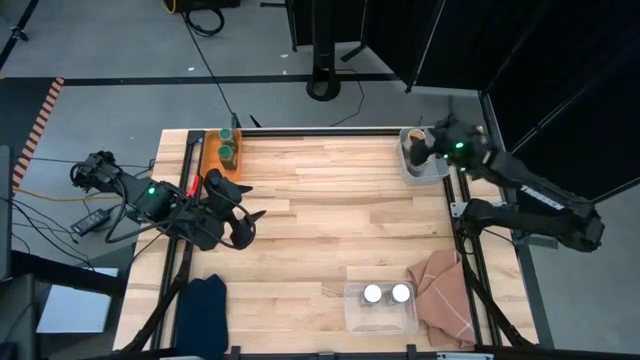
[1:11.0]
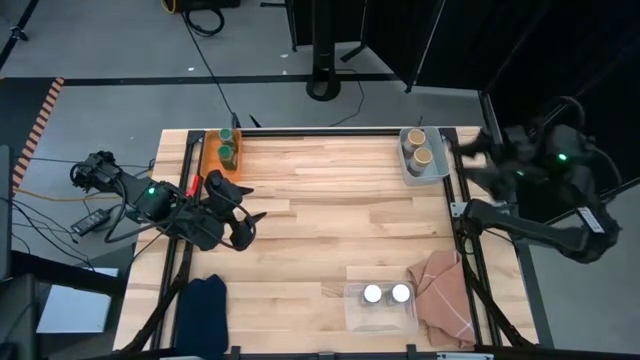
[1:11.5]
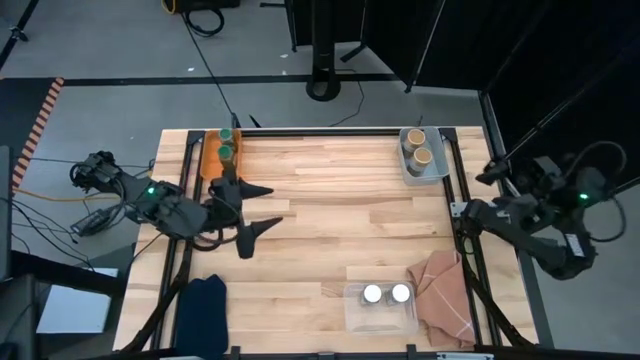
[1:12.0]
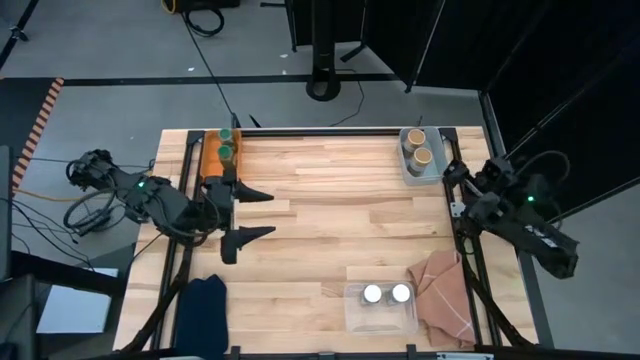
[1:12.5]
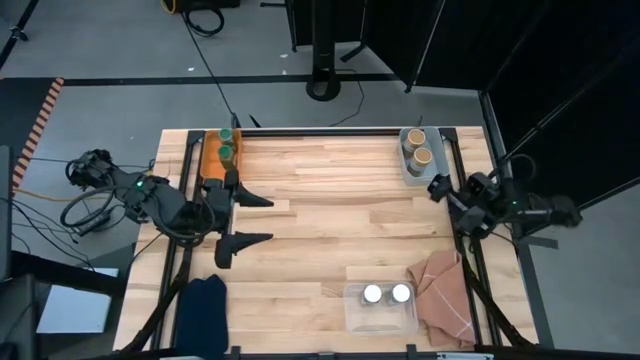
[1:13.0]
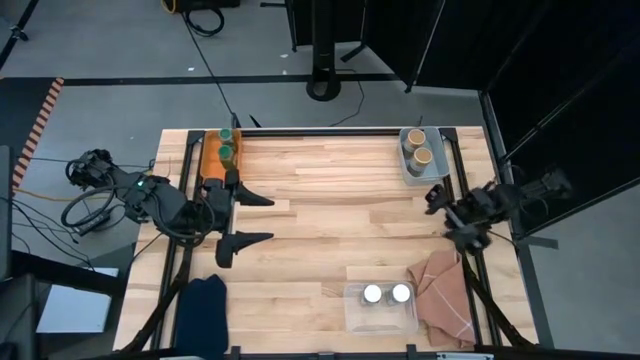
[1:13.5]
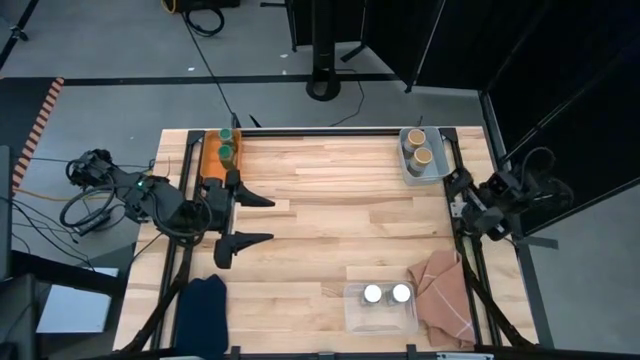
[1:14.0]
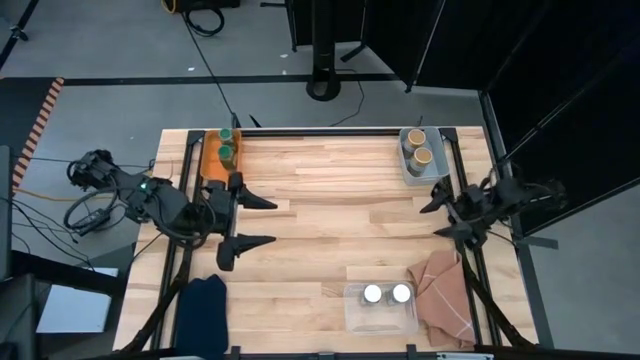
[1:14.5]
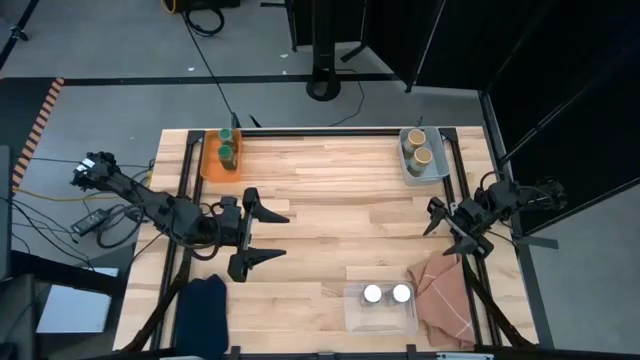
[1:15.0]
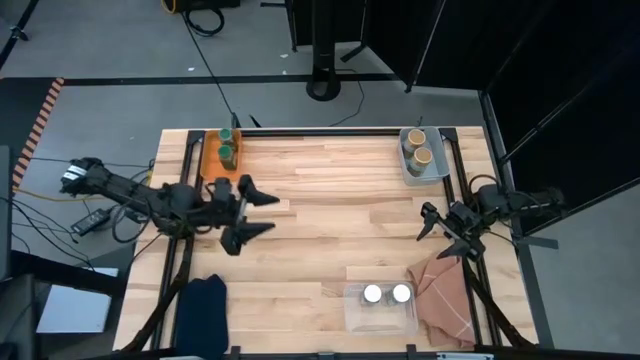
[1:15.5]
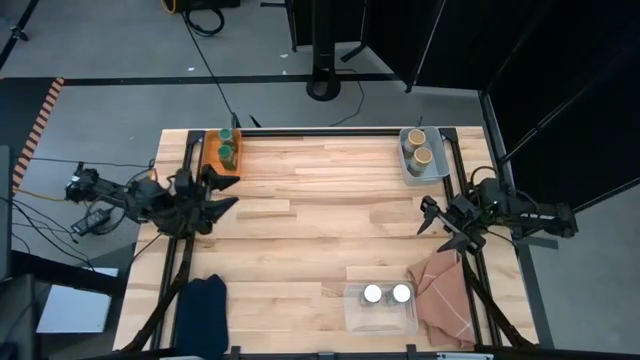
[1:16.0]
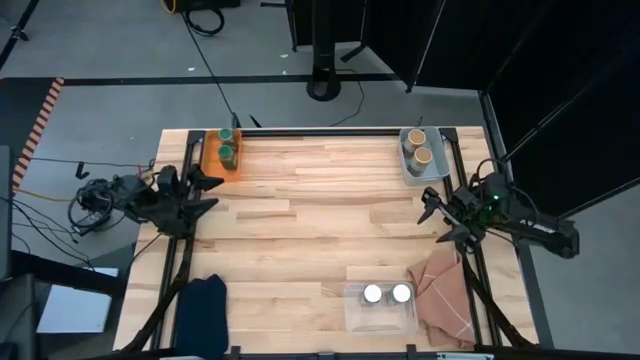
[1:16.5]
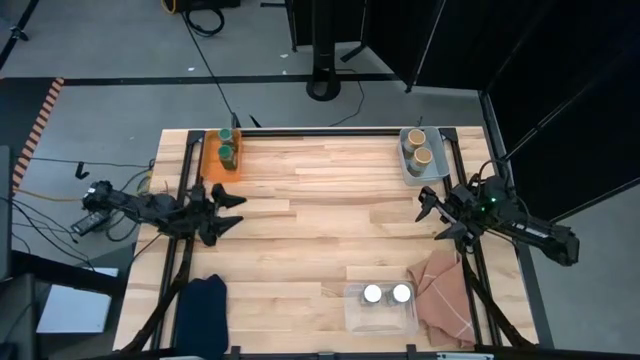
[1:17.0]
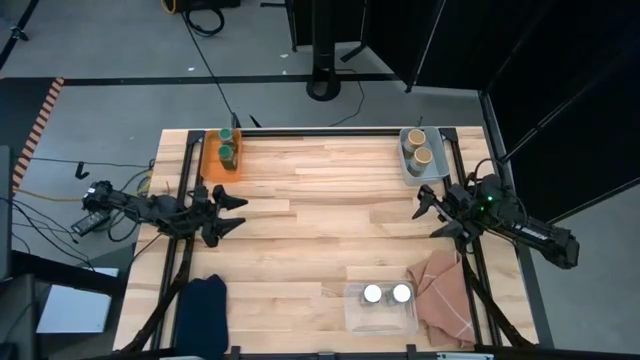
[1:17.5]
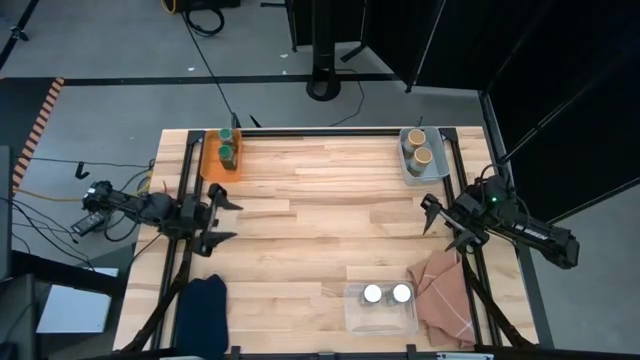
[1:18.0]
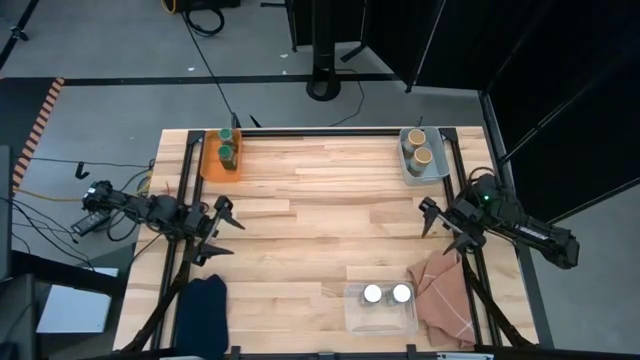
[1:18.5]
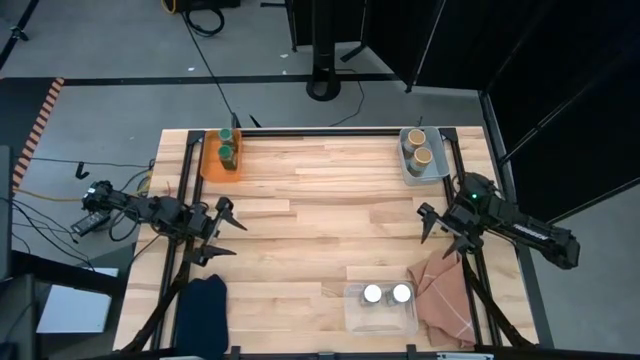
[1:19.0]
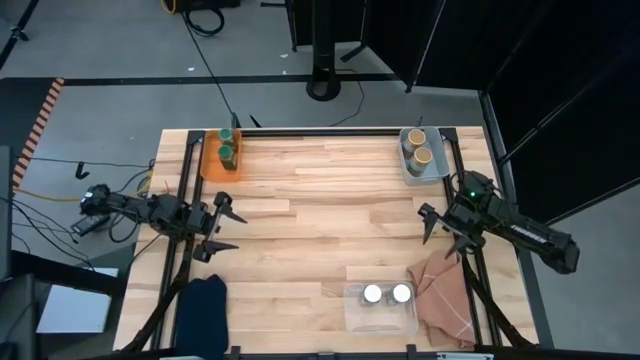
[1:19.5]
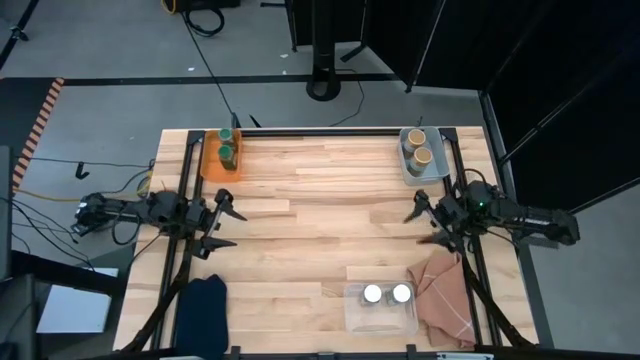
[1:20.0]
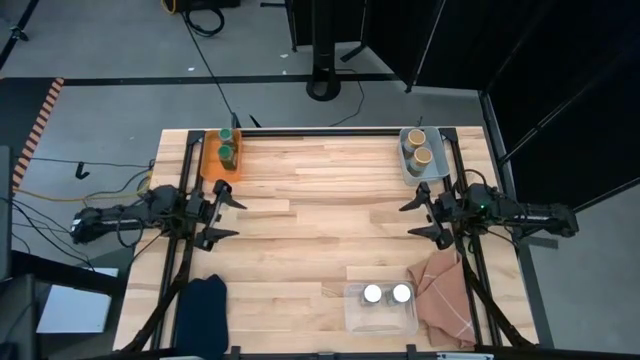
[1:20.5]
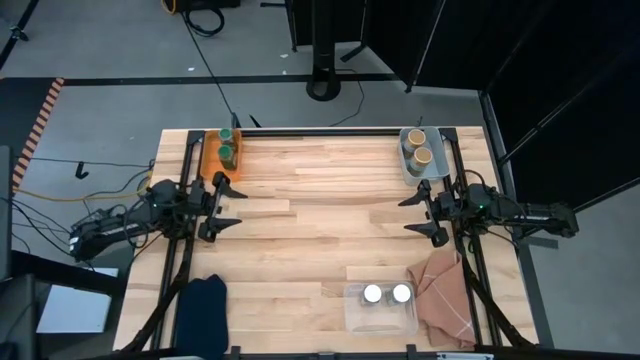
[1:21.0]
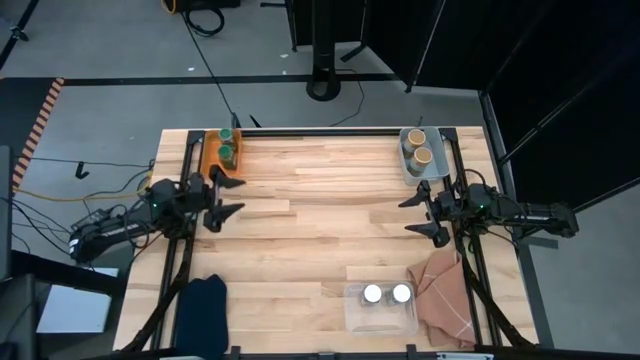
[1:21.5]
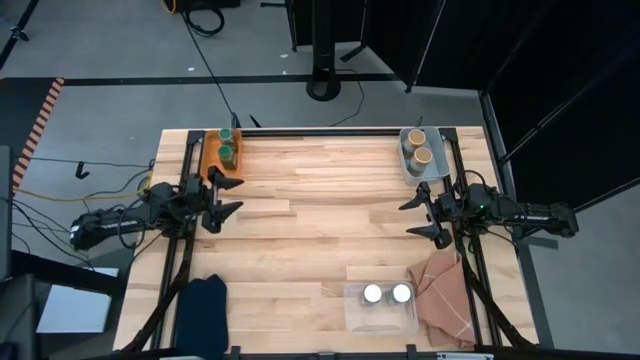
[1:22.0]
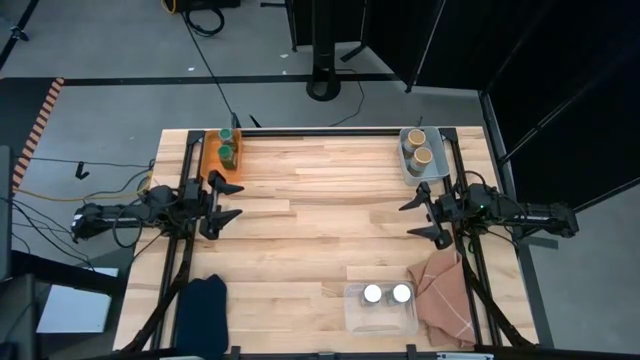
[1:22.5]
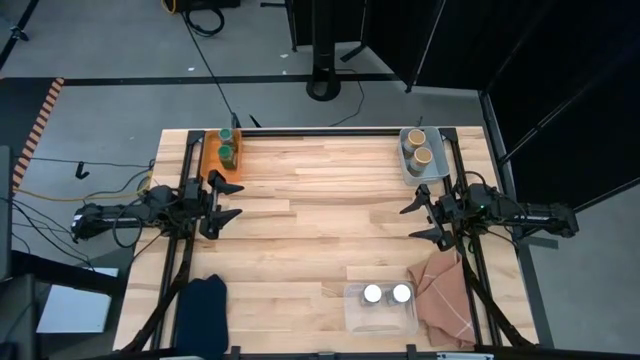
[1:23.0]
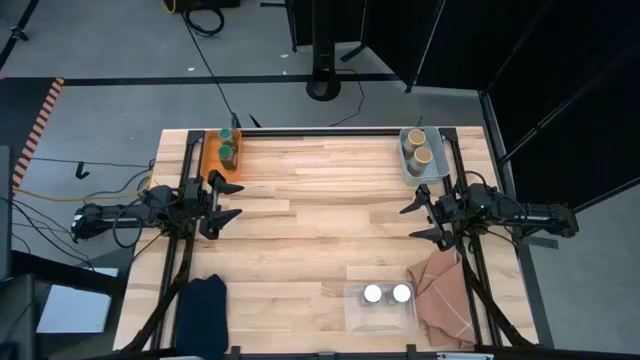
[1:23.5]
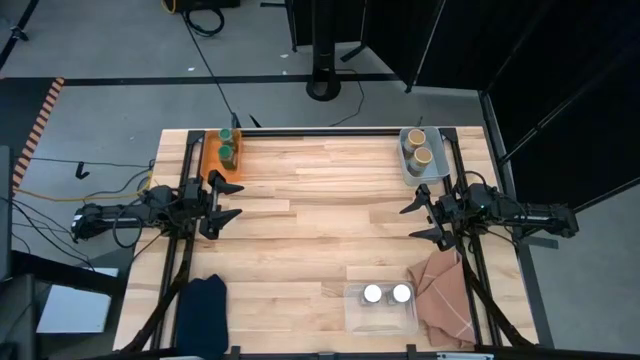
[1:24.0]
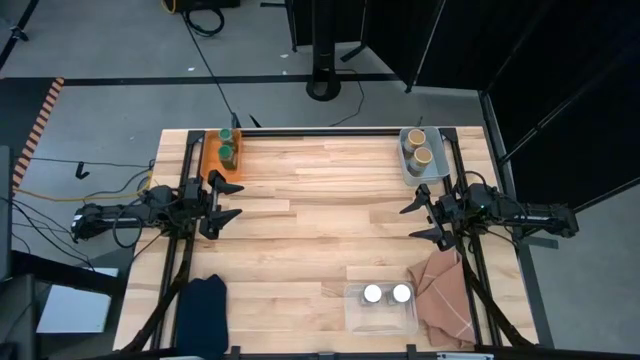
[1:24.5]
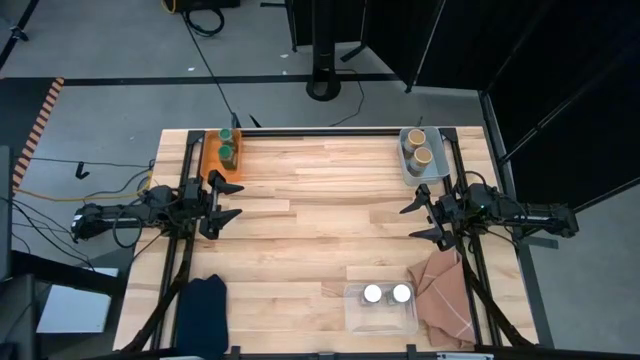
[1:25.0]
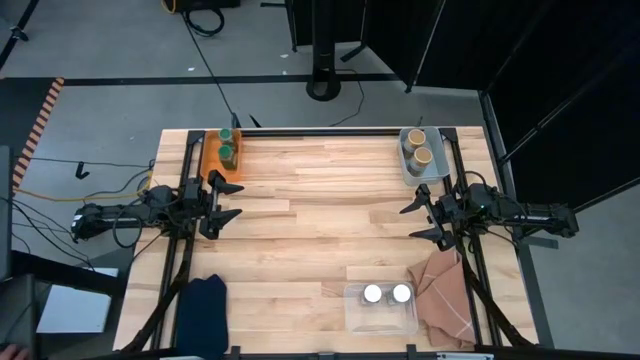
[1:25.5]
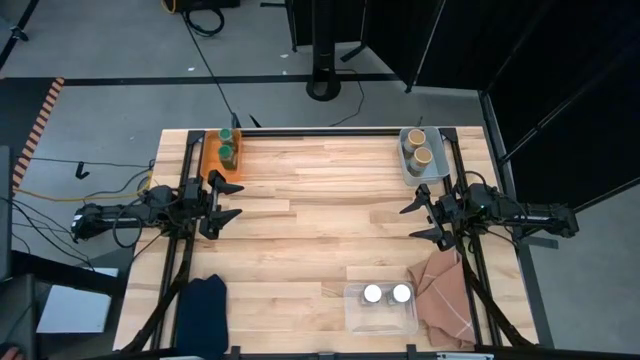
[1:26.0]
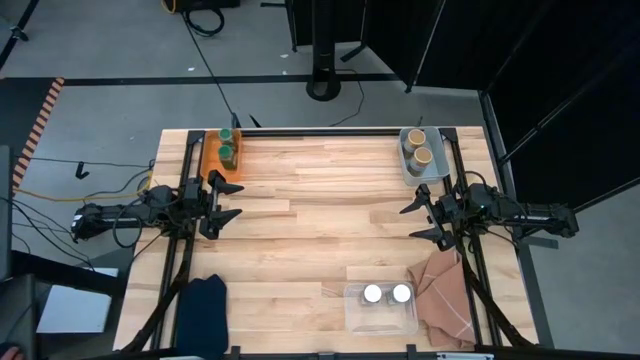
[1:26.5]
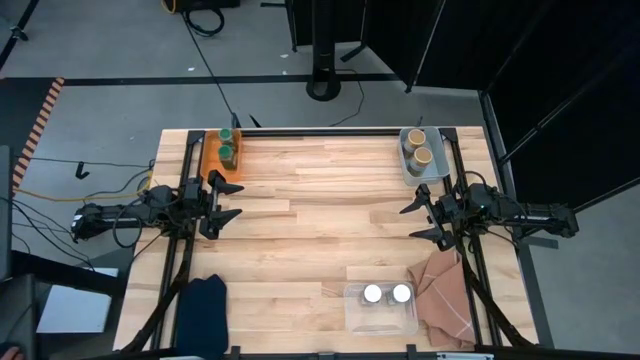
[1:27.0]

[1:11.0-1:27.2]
Task: Sort spices by type
Return to Home Position

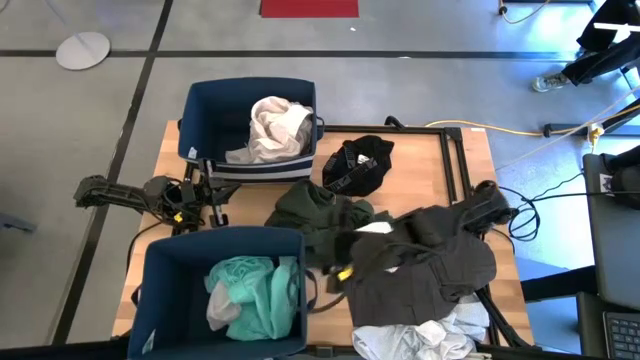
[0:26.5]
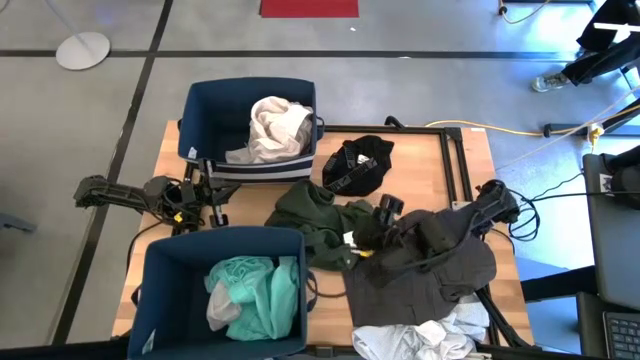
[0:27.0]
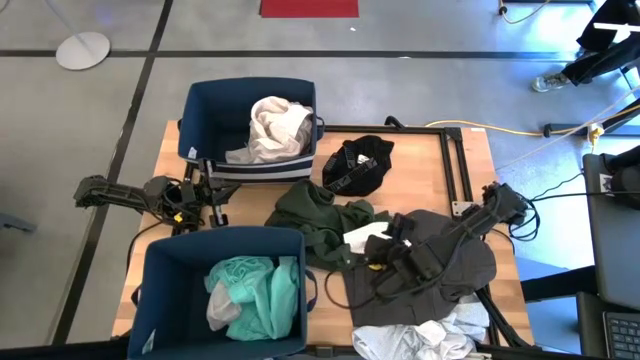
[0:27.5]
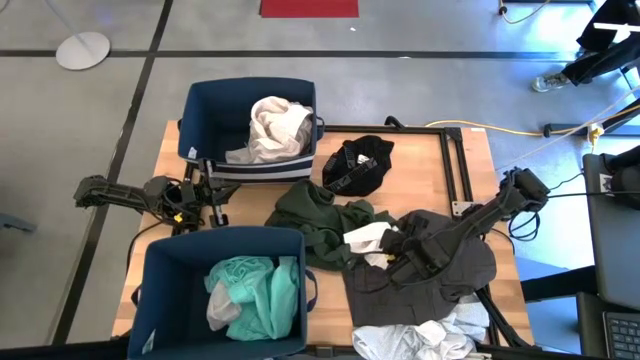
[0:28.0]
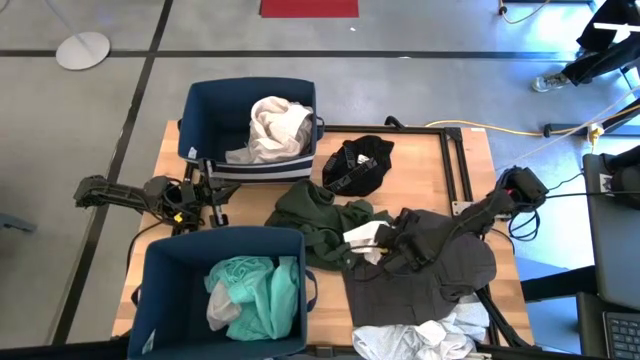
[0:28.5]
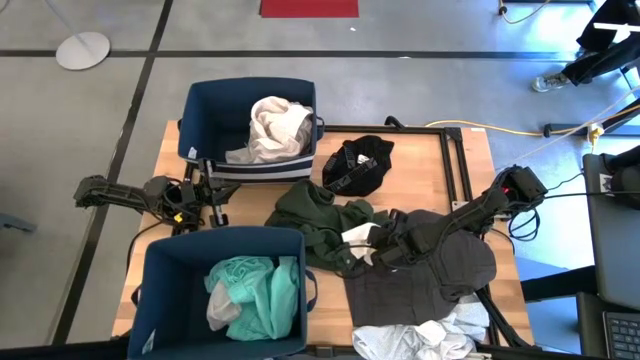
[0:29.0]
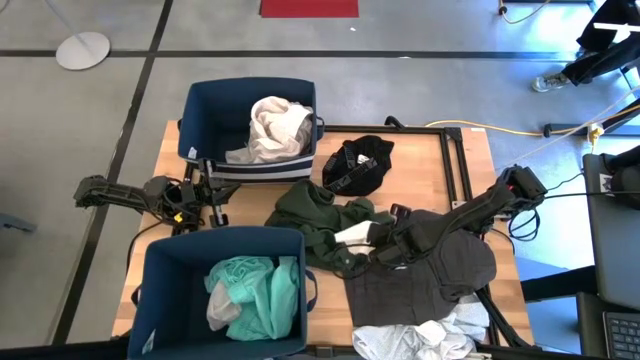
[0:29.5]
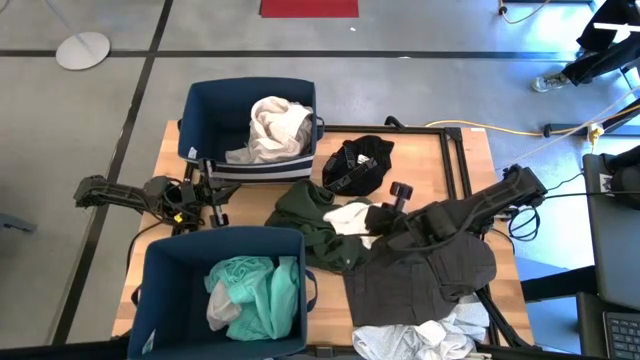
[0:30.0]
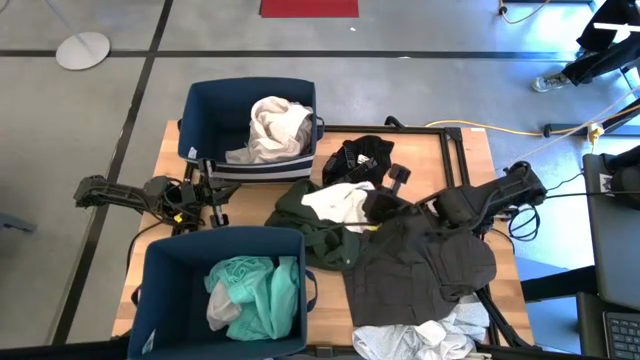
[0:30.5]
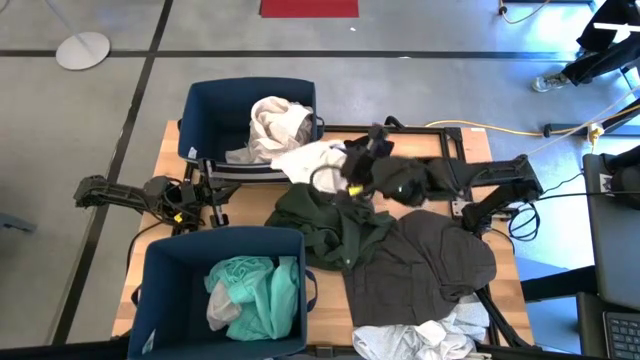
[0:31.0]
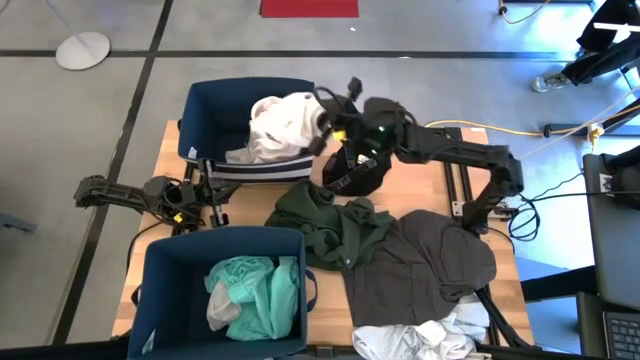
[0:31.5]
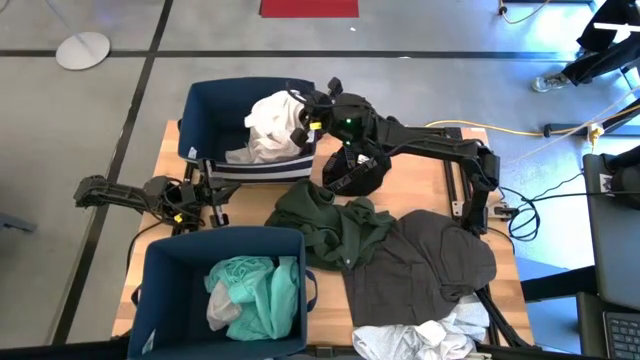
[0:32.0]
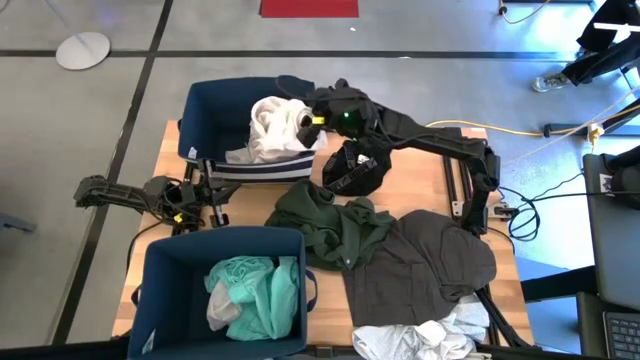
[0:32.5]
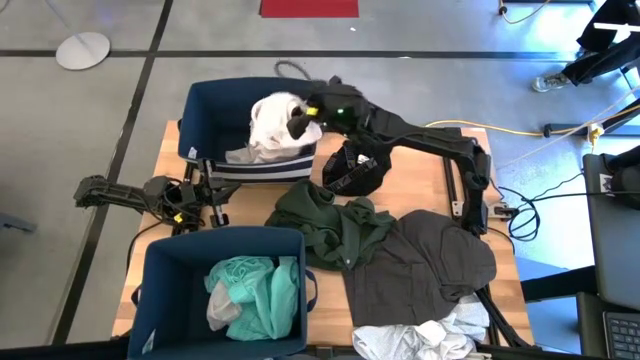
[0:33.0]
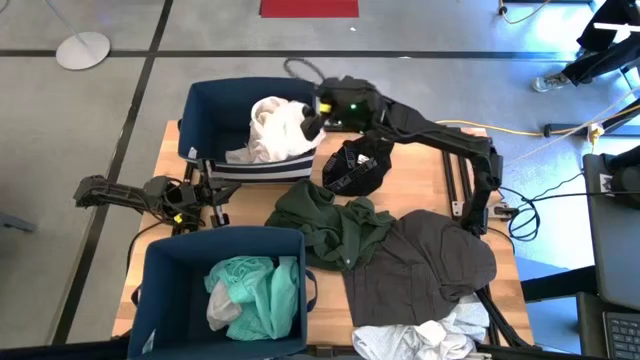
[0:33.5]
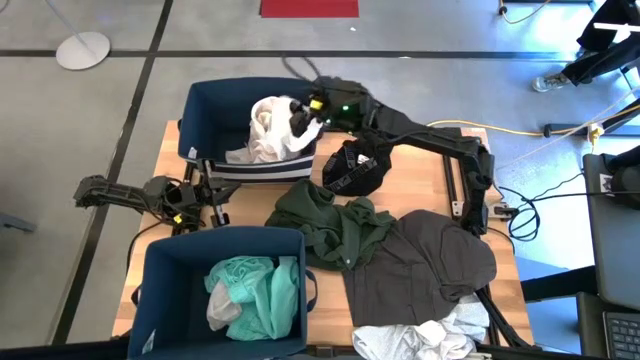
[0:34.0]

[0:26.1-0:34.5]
Task: Sort clothes
Put the white underwear into the top blue laundry bin
